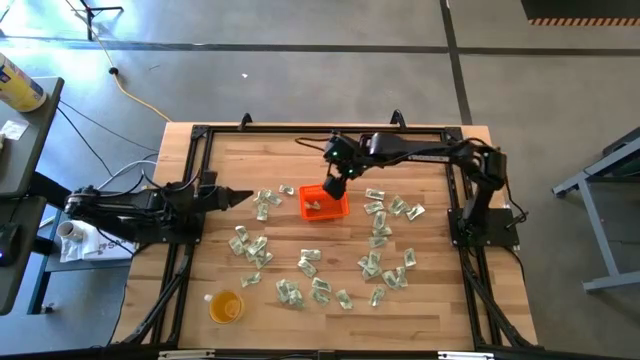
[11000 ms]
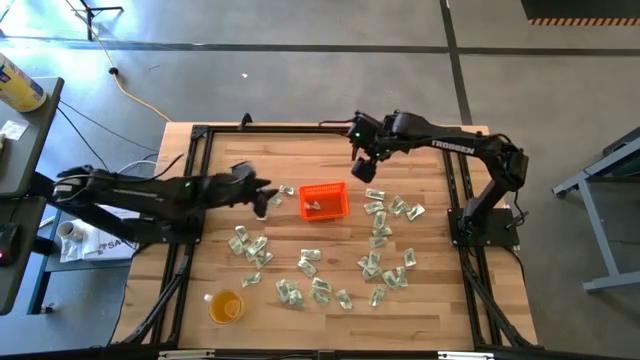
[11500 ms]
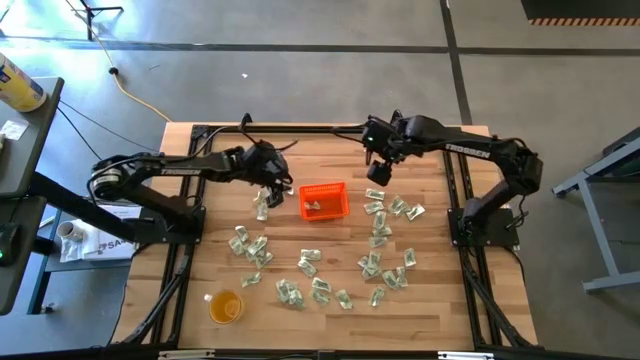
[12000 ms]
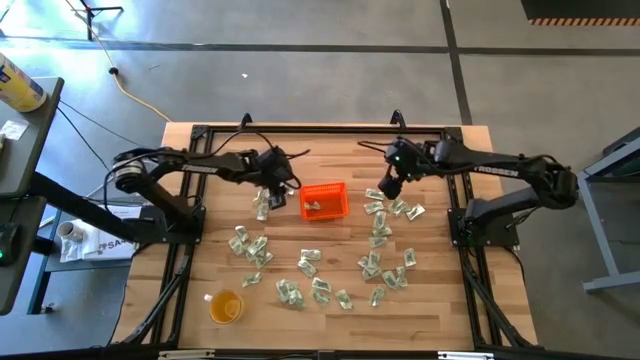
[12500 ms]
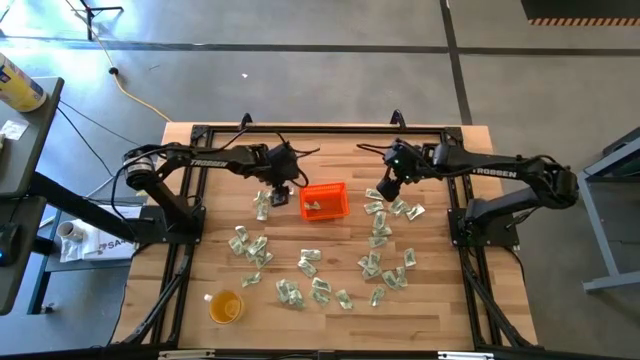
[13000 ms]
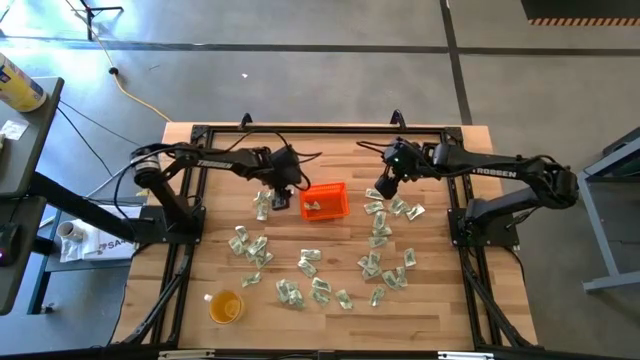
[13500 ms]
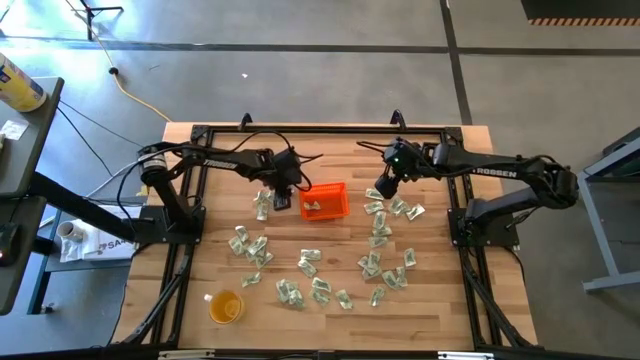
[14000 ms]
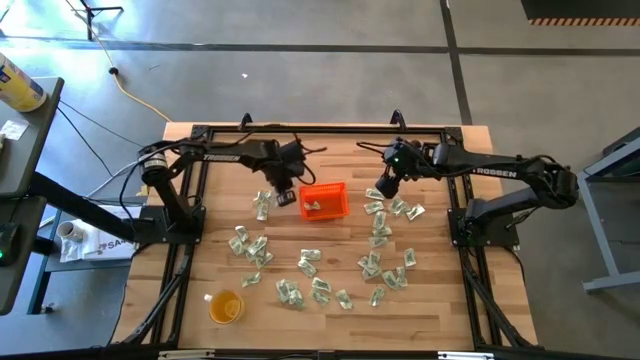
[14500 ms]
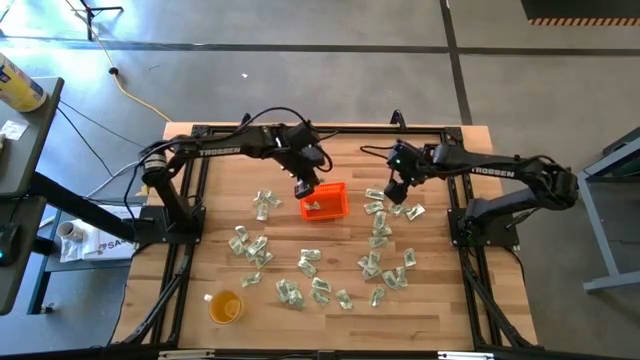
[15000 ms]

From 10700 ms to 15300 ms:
Task: Pick and place Stevia / Truvia into bins
Put the stevia packet into the basket

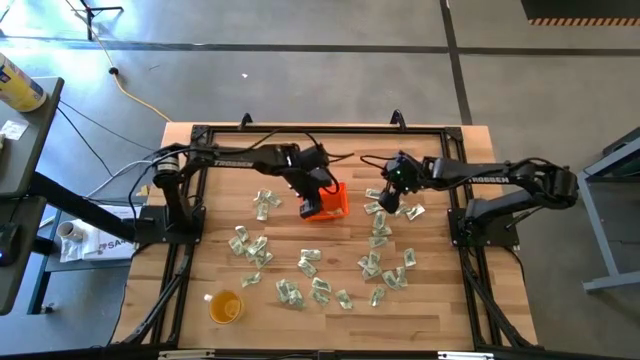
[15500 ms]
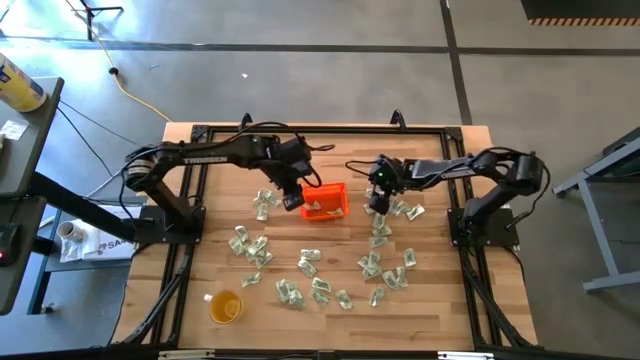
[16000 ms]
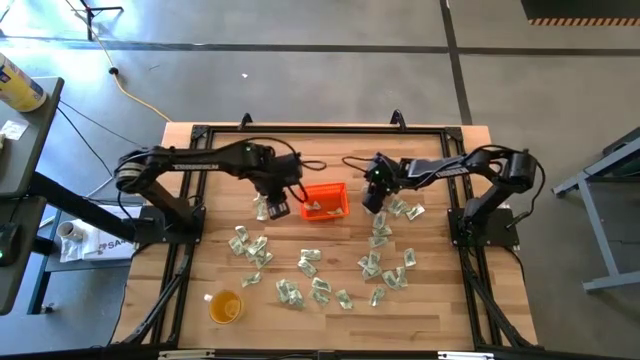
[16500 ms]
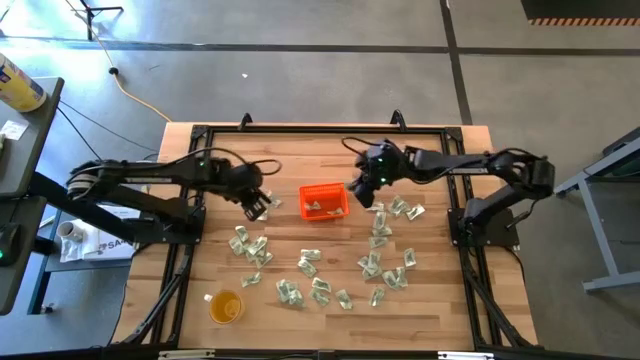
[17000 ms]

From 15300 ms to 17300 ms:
Put the stevia packet into the basket

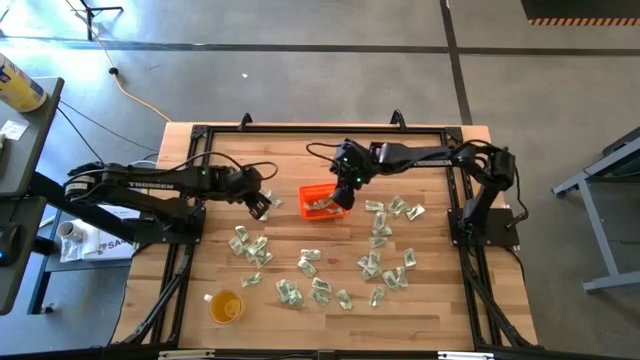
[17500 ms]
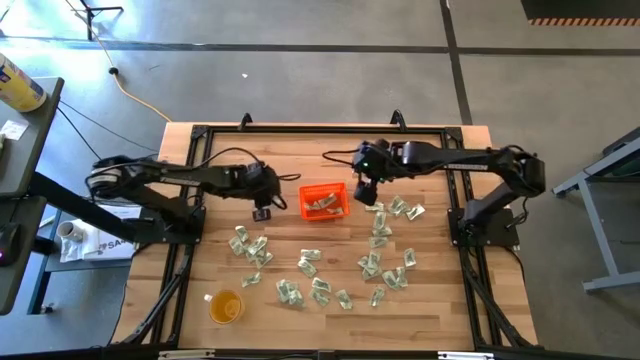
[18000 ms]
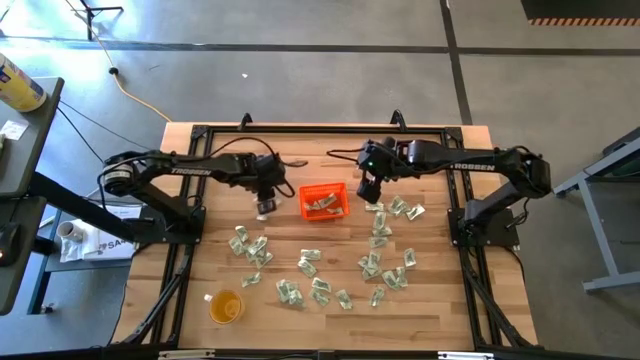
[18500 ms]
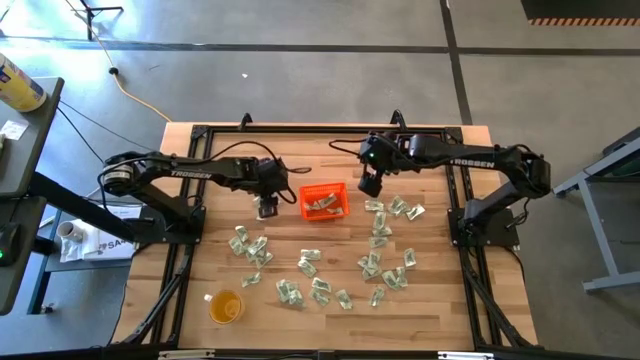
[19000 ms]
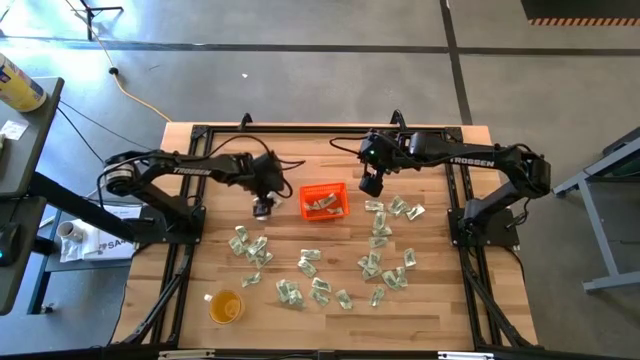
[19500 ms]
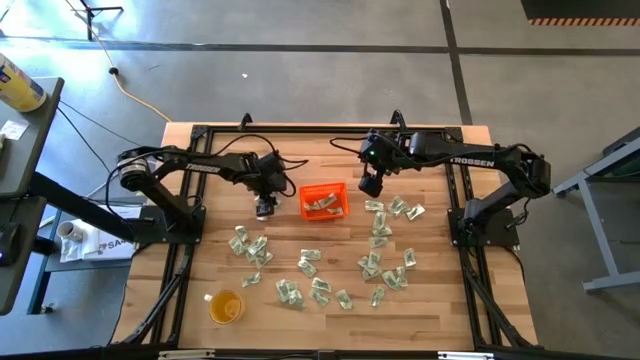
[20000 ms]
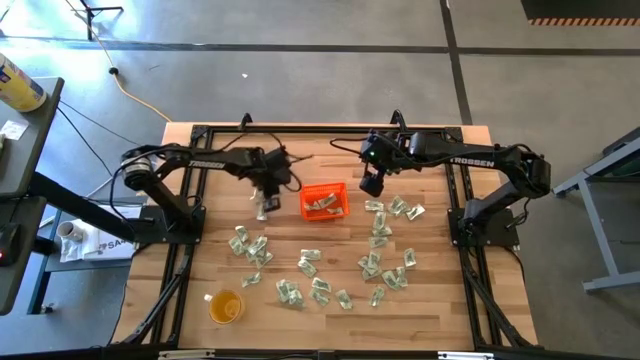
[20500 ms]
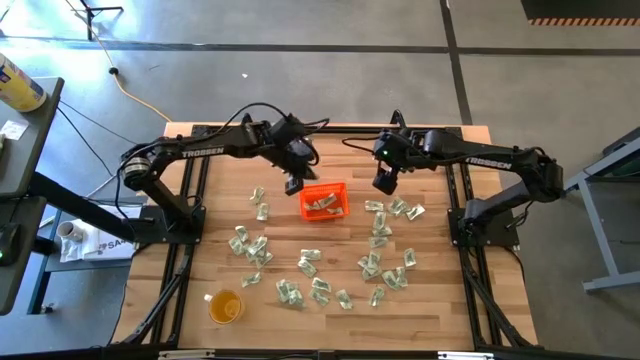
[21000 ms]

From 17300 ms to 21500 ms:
Put the stevia packet into the basket

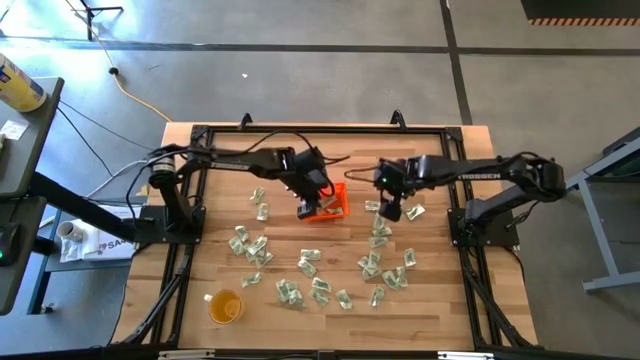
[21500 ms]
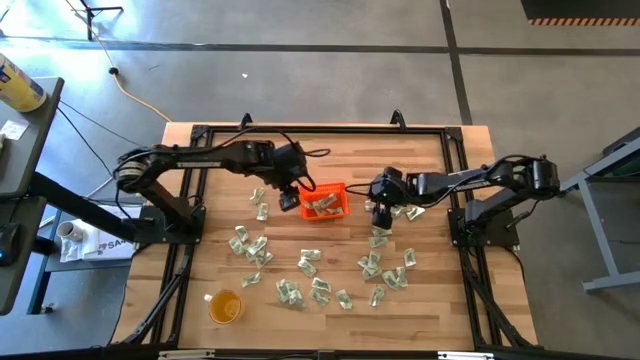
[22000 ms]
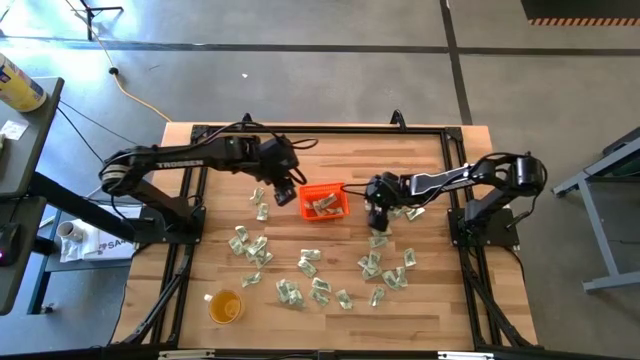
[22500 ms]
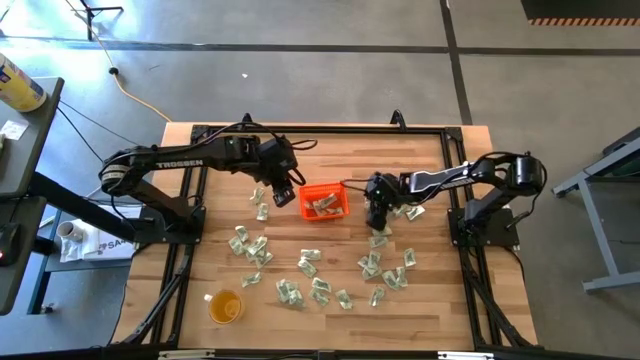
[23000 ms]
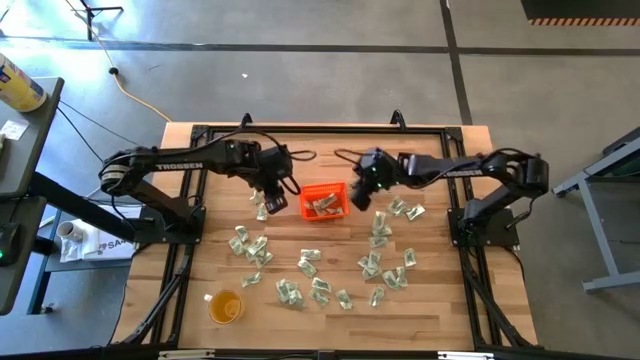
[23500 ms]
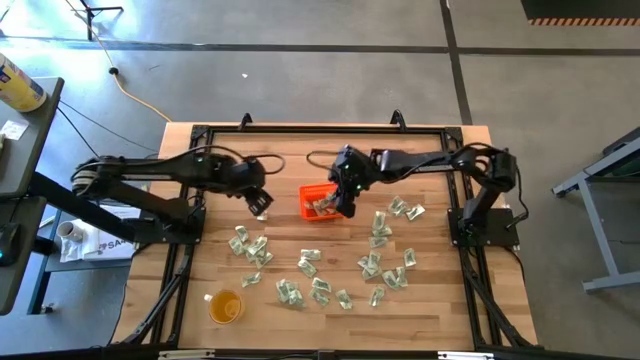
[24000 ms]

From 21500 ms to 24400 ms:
Put the stevia packet into the basket

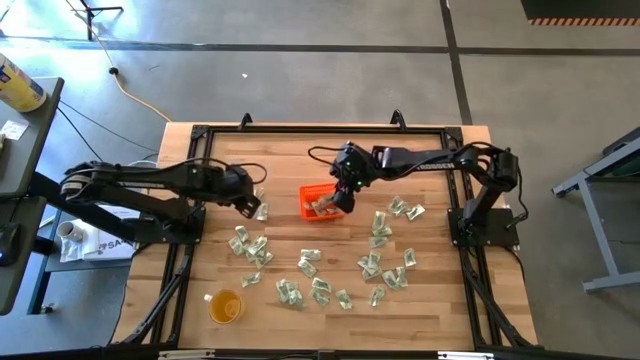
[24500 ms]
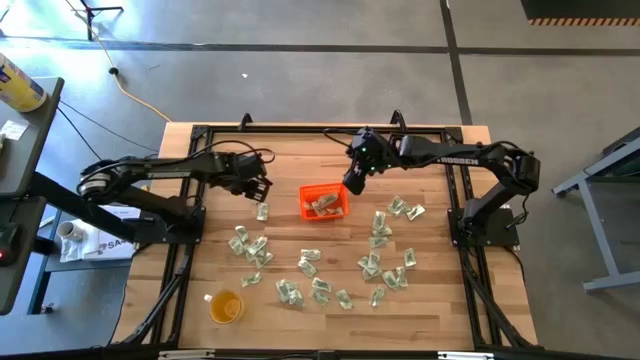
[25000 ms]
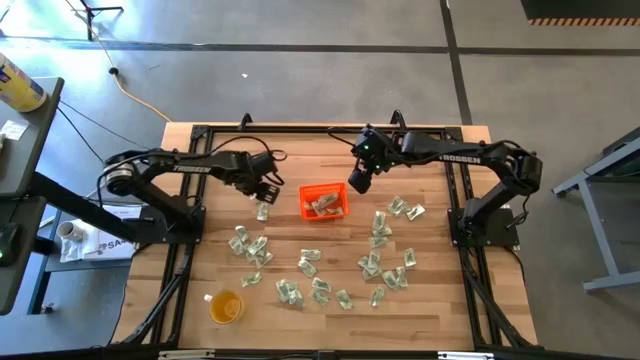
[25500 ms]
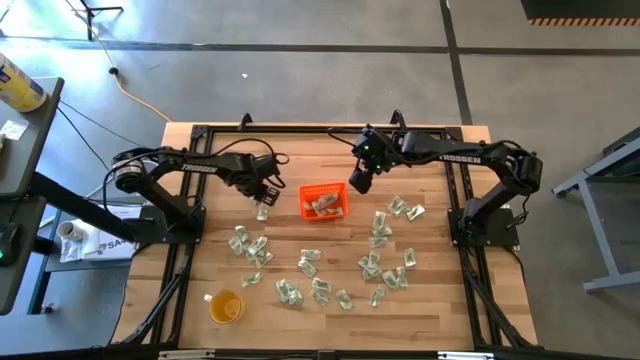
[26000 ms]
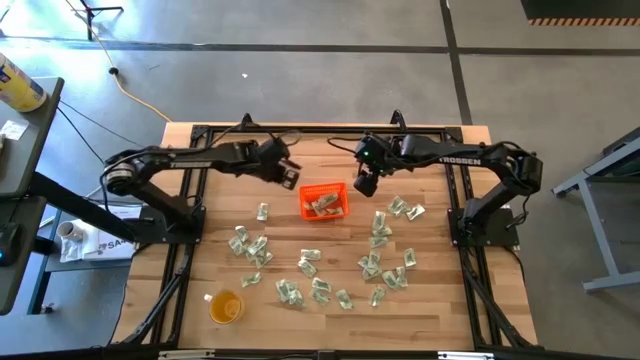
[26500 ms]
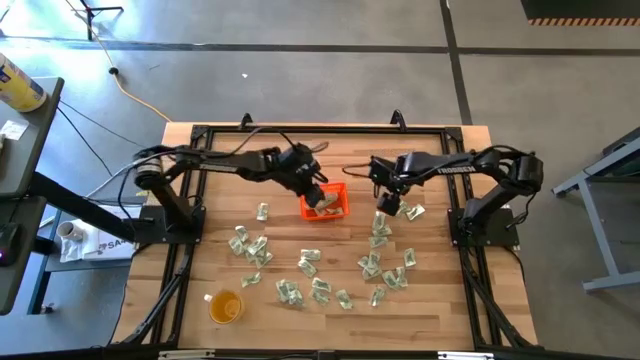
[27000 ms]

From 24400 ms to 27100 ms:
Put the stevia packet into the basket

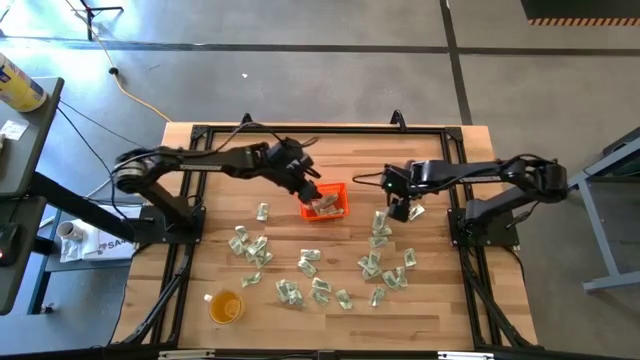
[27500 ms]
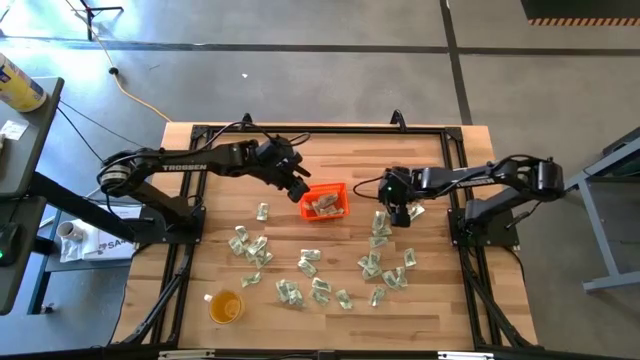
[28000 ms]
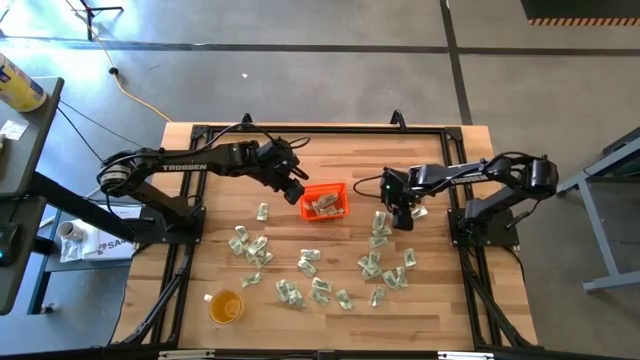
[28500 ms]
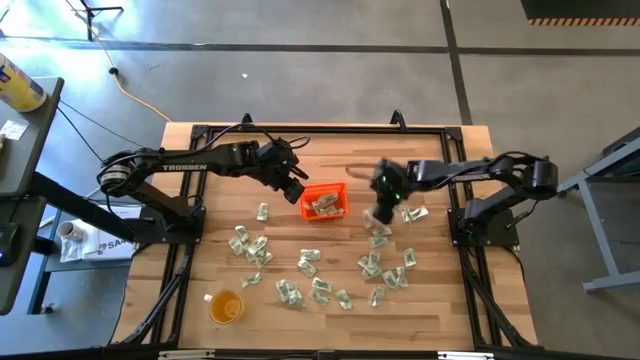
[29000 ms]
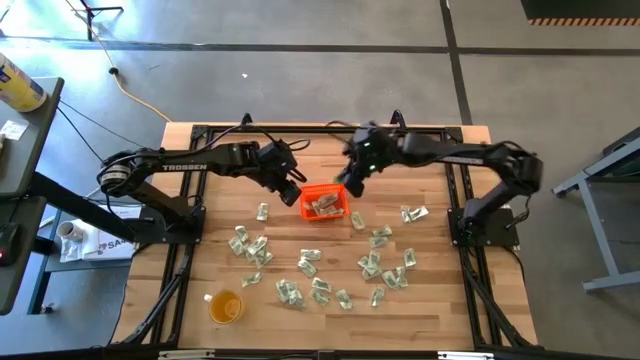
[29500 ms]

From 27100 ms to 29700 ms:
Put the stevia packet into the basket

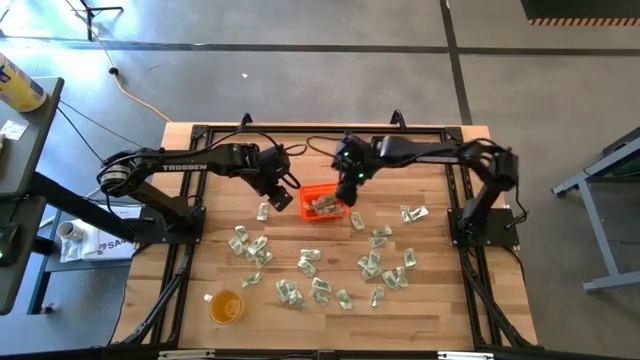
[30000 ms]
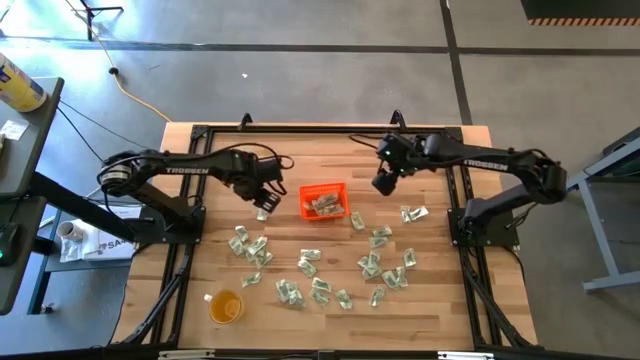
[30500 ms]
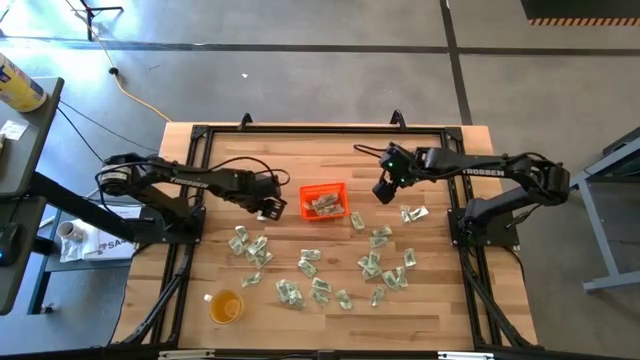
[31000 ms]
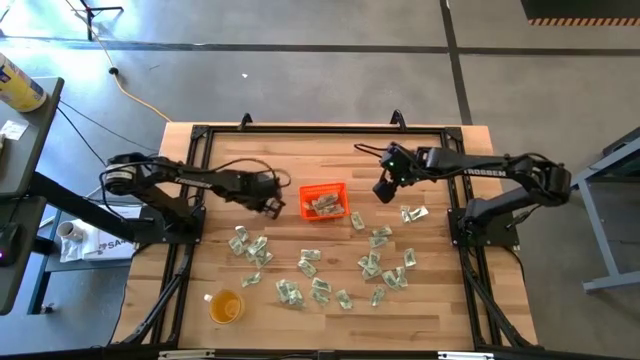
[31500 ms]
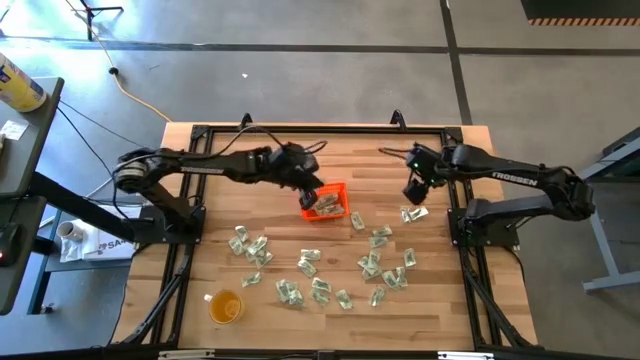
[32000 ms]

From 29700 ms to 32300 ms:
Put the stevia packet into the basket

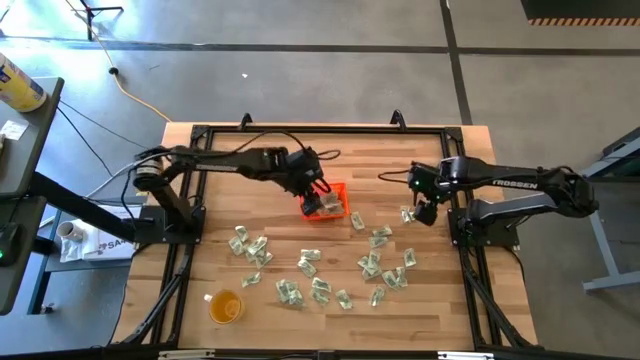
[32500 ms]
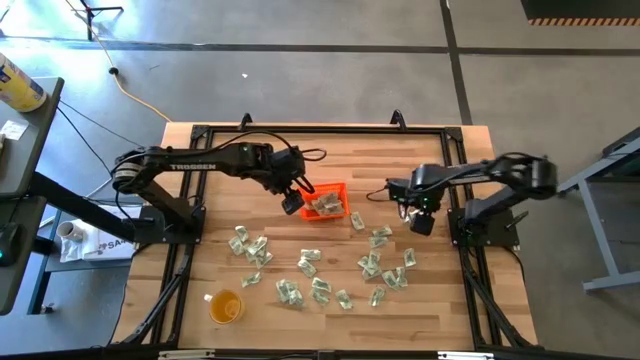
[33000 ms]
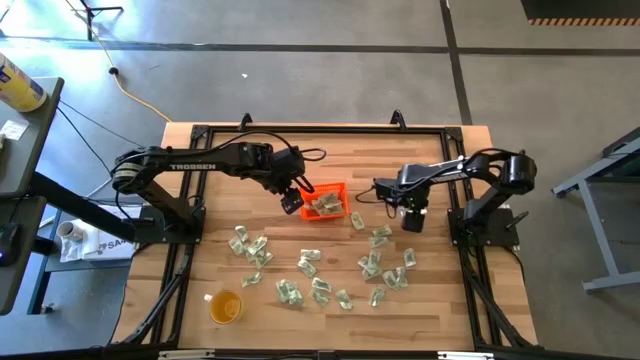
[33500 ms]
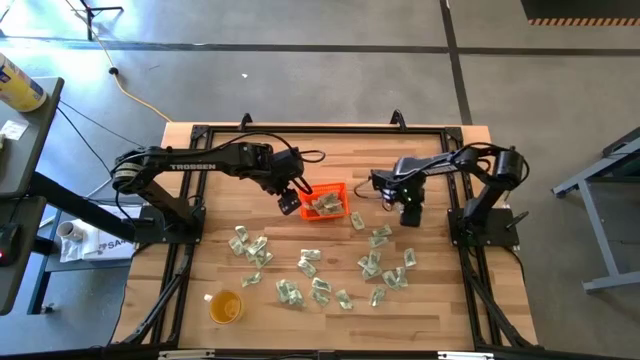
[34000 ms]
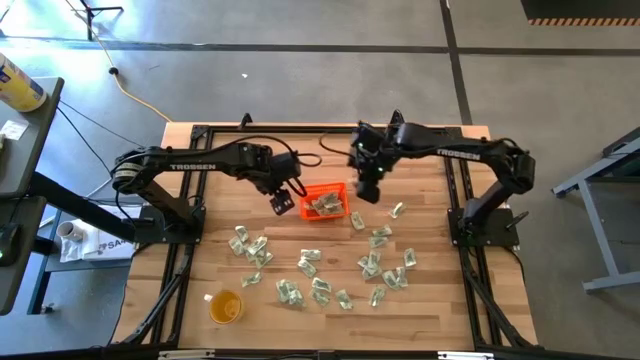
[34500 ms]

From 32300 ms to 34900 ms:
Put the stevia packet into the basket
